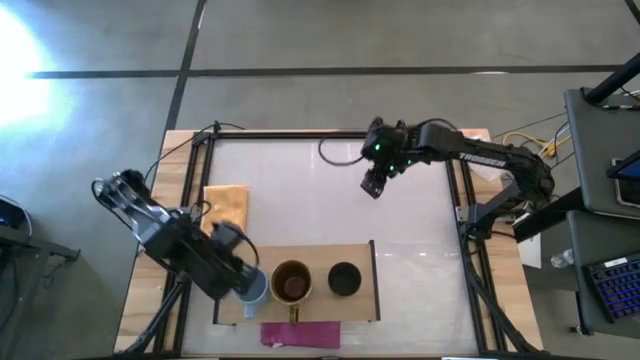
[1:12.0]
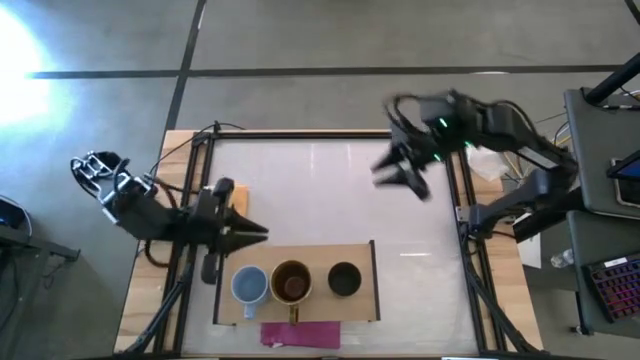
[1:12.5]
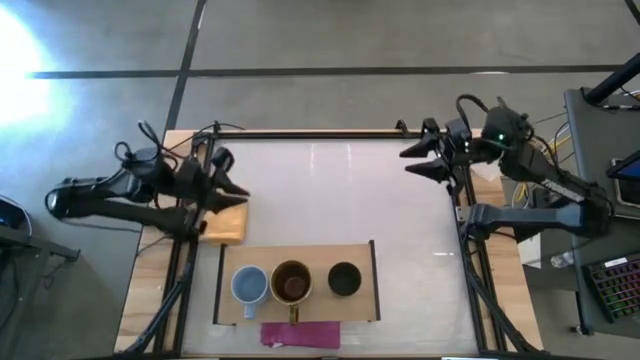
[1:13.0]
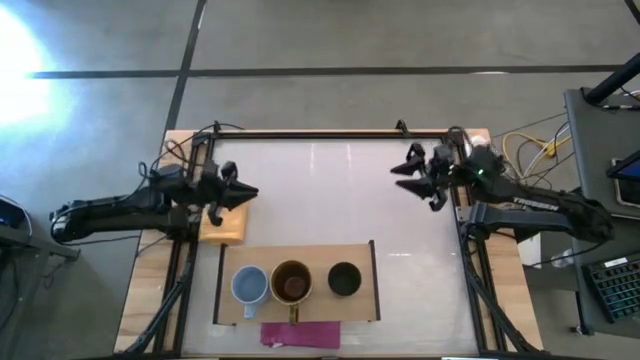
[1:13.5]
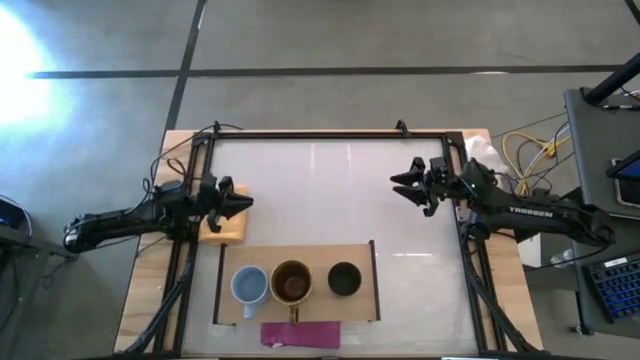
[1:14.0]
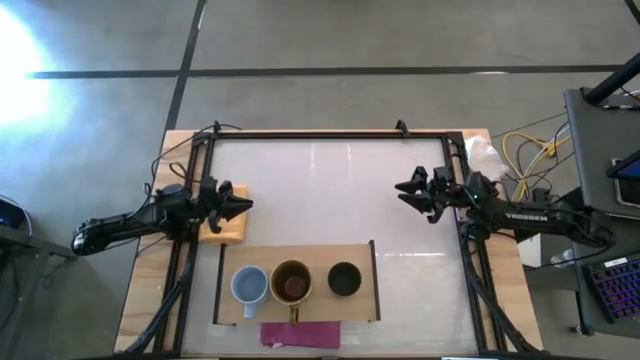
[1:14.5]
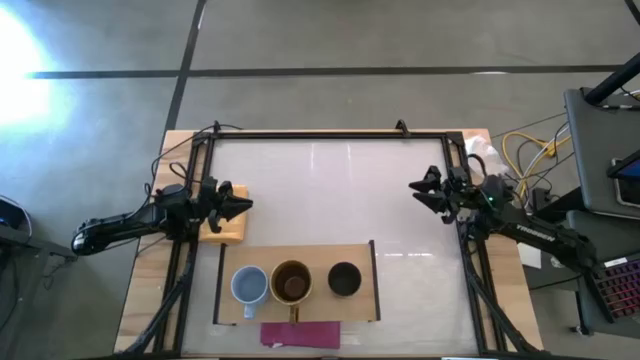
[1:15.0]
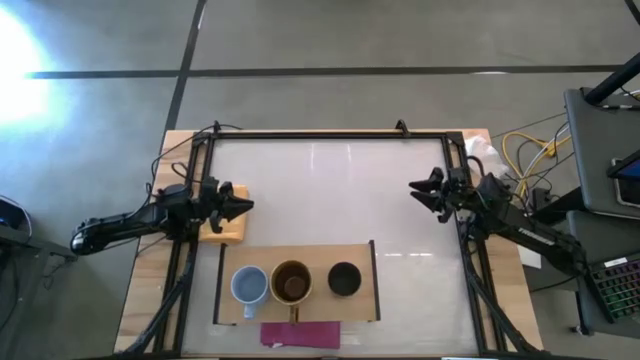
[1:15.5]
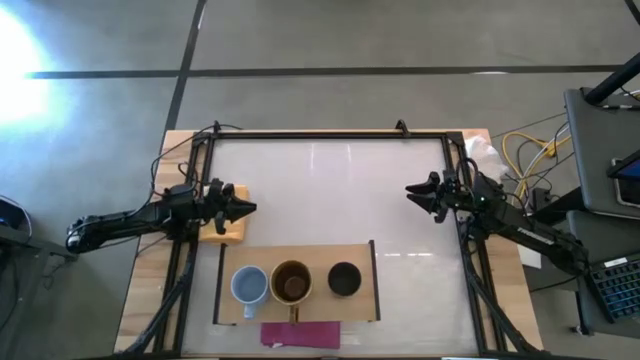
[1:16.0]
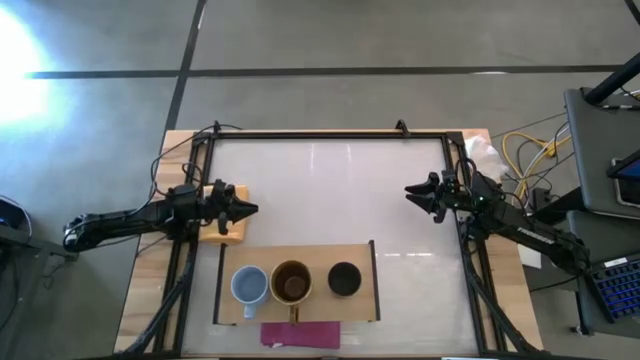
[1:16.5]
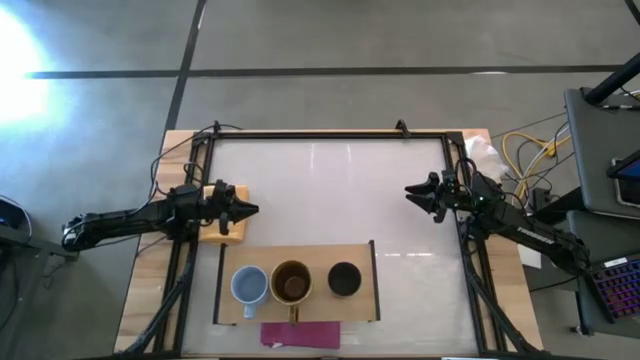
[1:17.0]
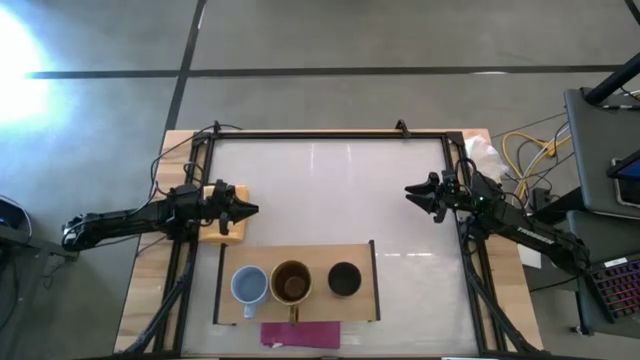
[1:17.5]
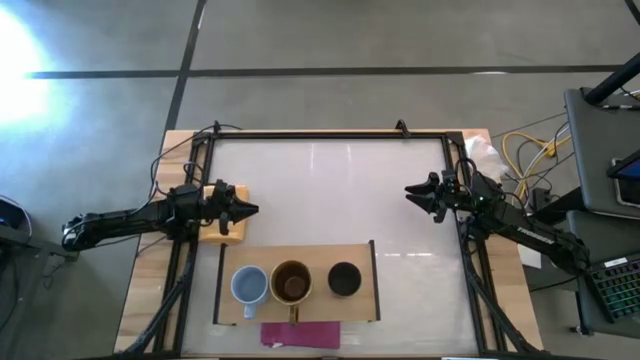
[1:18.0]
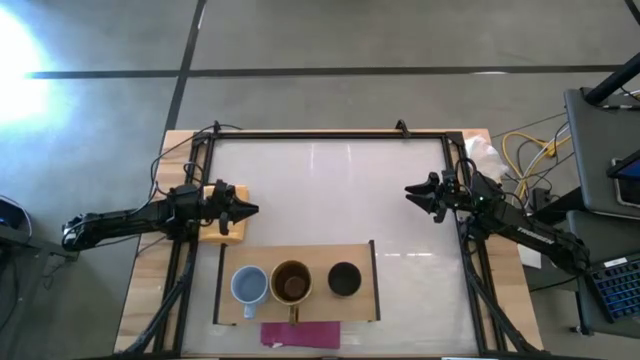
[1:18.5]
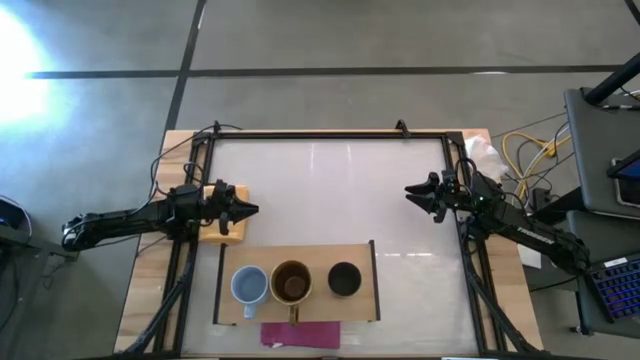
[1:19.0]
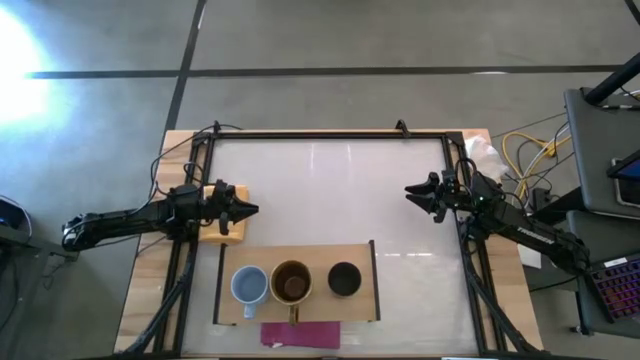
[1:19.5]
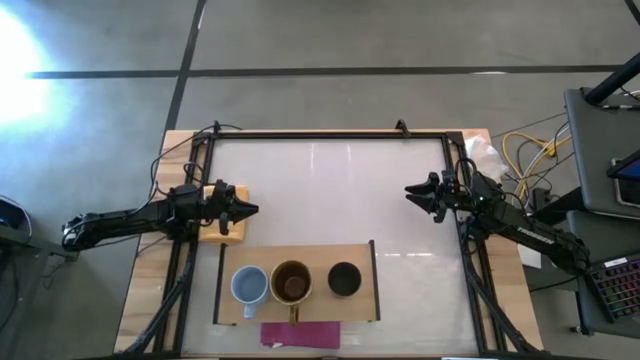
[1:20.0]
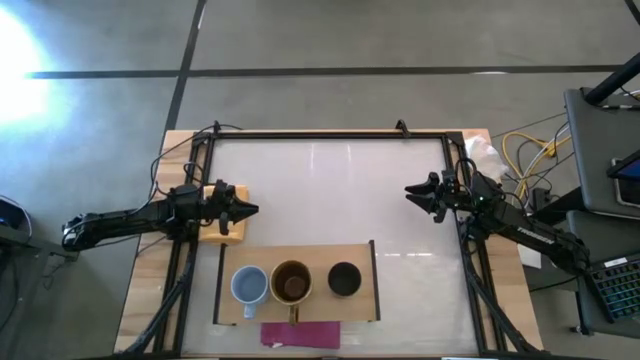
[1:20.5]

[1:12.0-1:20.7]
Task: Stack small to large cups/mugs on shelf
Return to Home Position

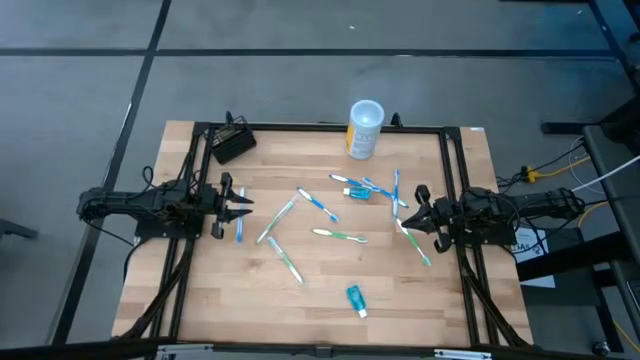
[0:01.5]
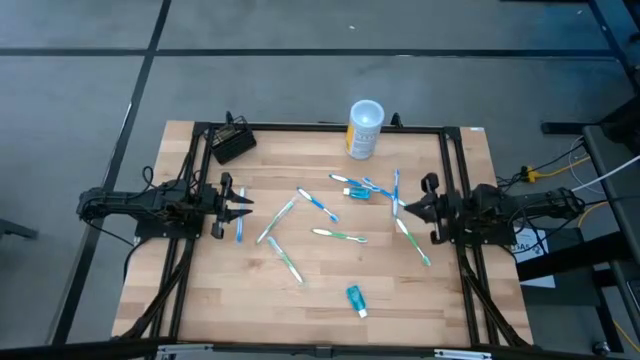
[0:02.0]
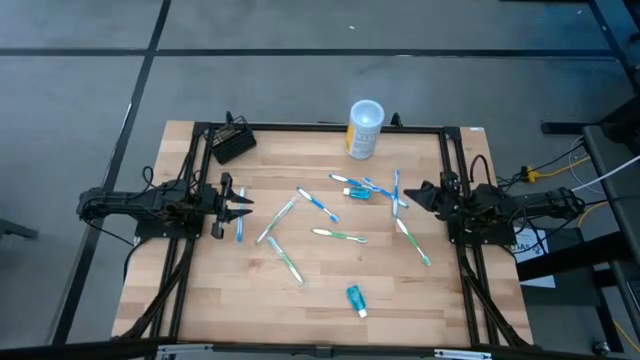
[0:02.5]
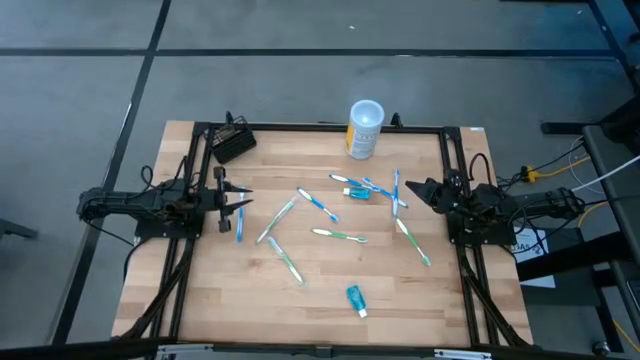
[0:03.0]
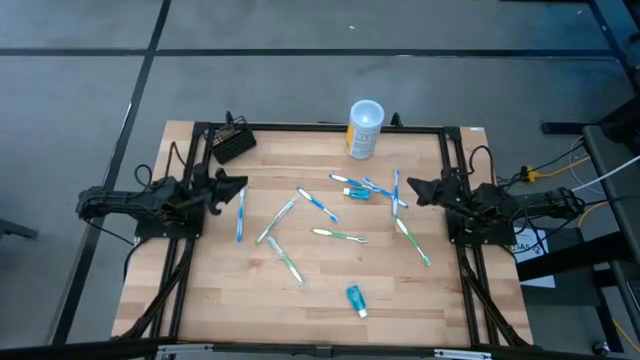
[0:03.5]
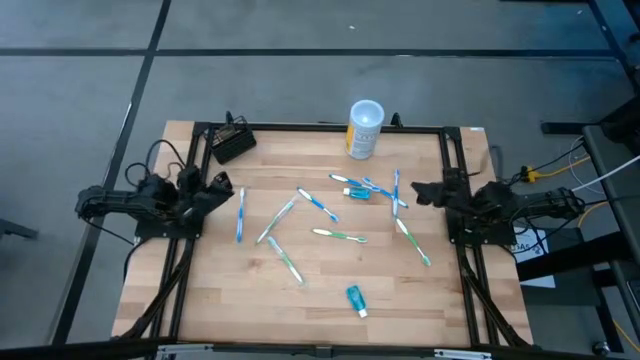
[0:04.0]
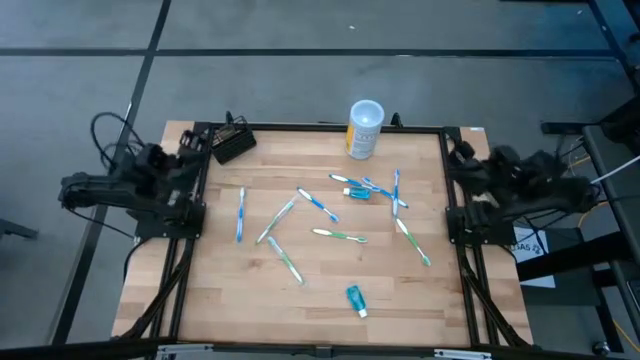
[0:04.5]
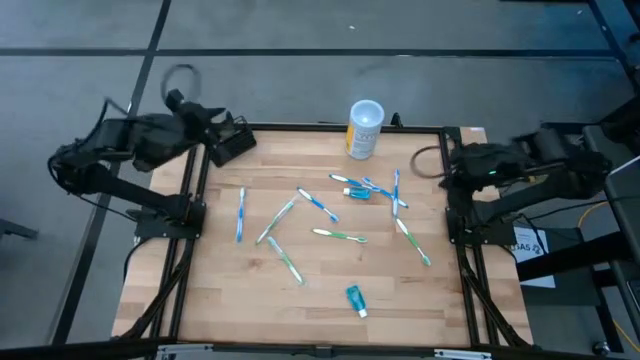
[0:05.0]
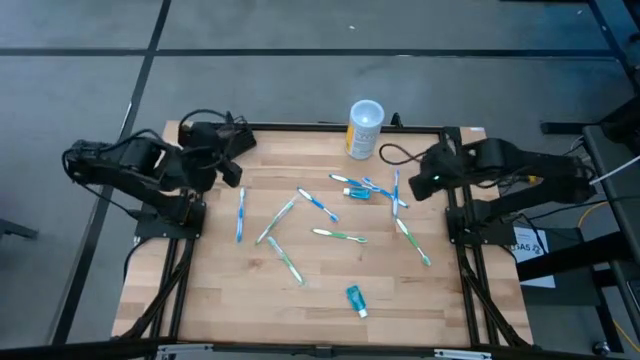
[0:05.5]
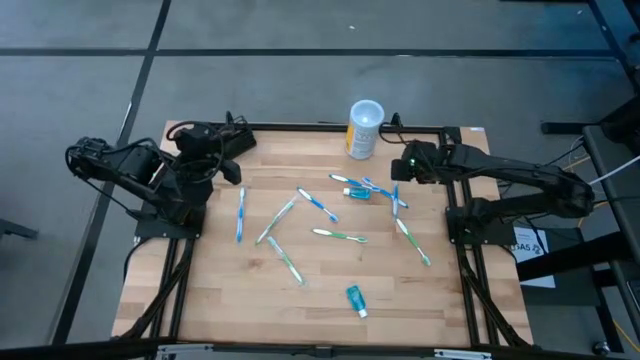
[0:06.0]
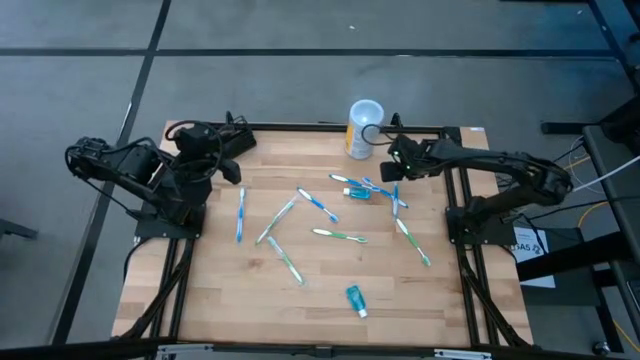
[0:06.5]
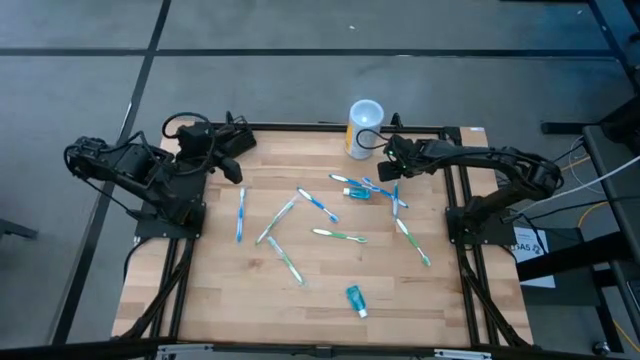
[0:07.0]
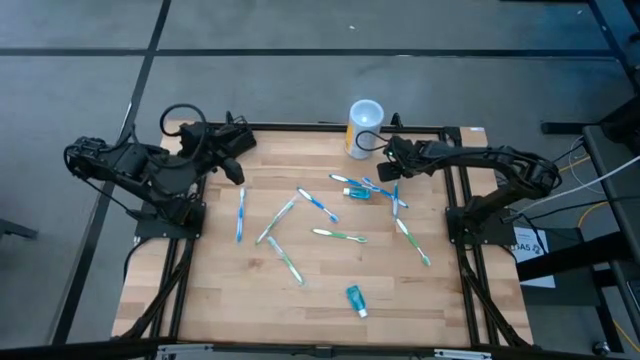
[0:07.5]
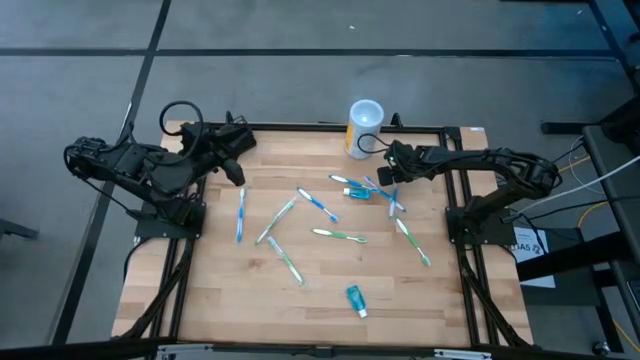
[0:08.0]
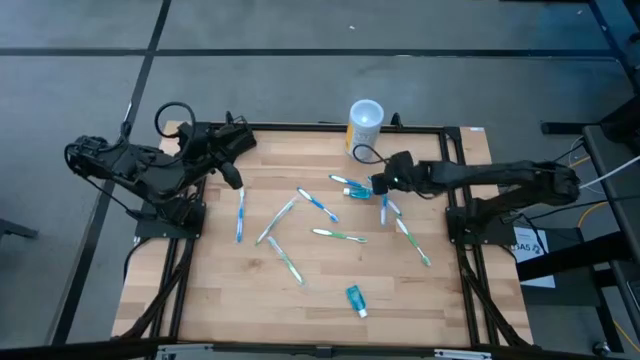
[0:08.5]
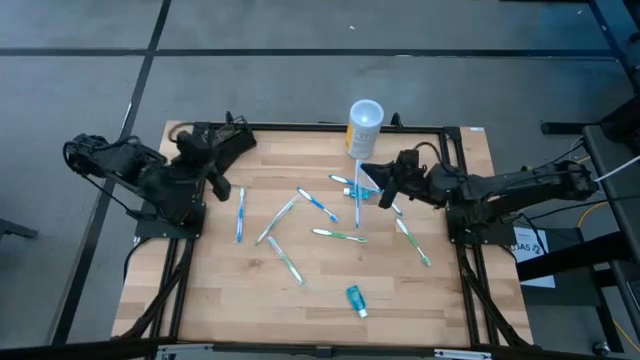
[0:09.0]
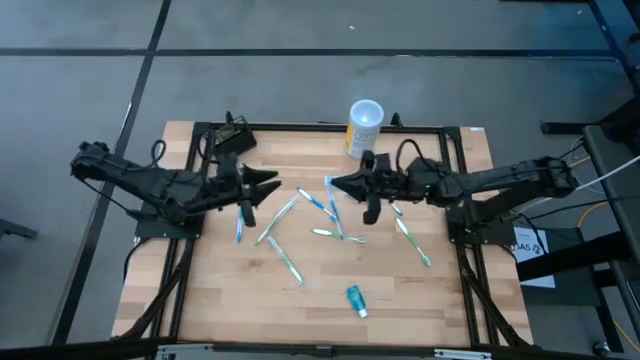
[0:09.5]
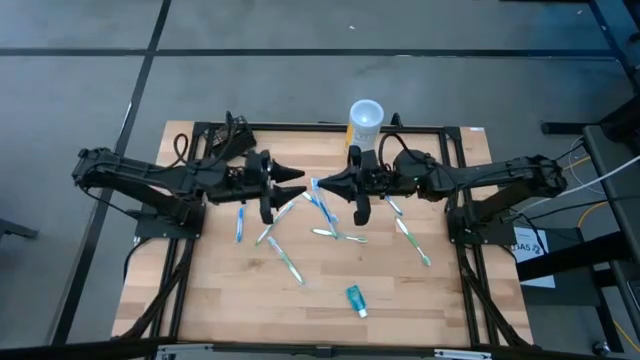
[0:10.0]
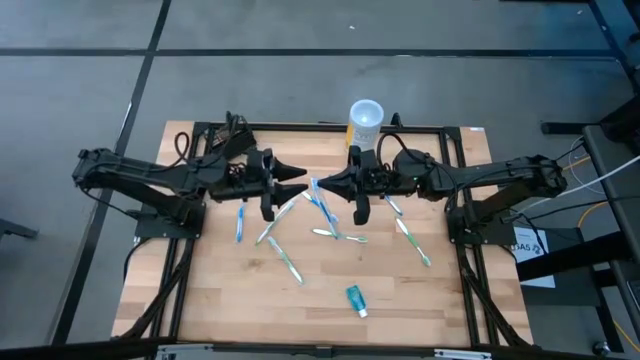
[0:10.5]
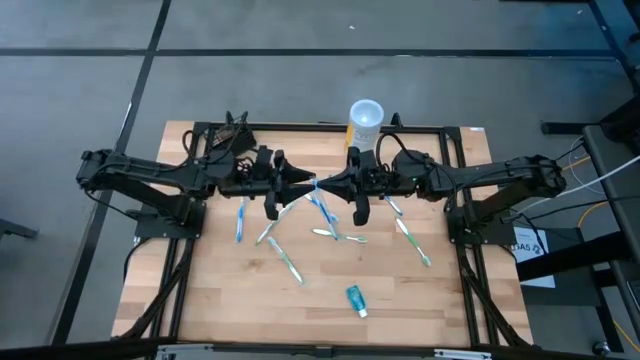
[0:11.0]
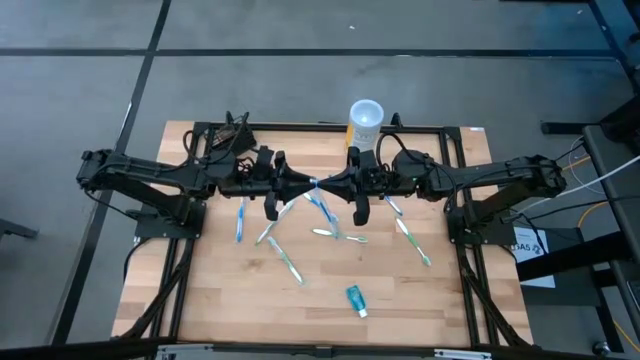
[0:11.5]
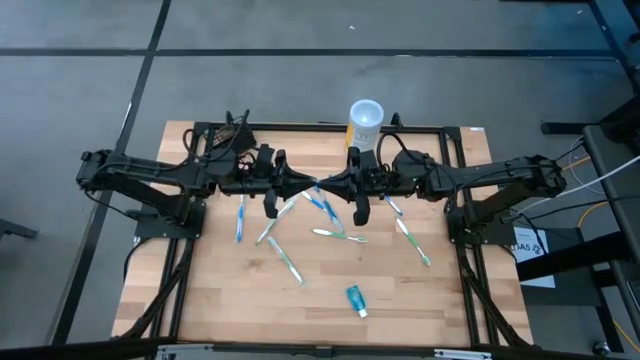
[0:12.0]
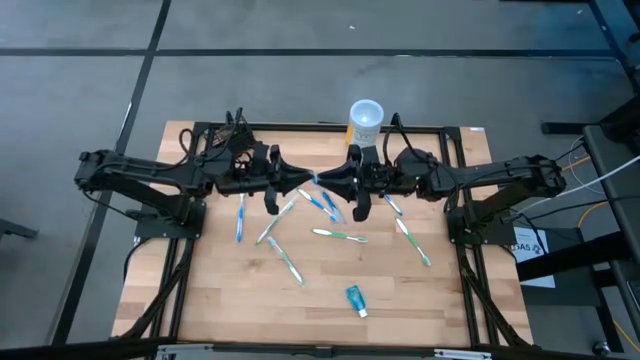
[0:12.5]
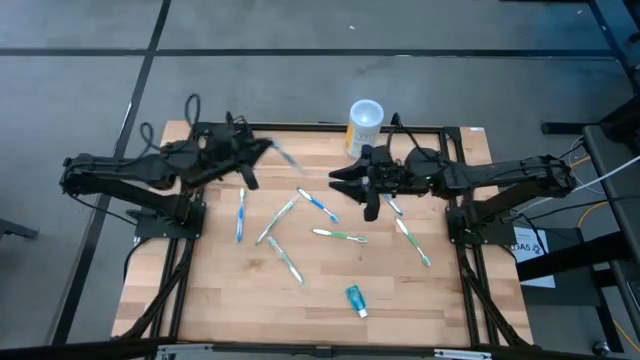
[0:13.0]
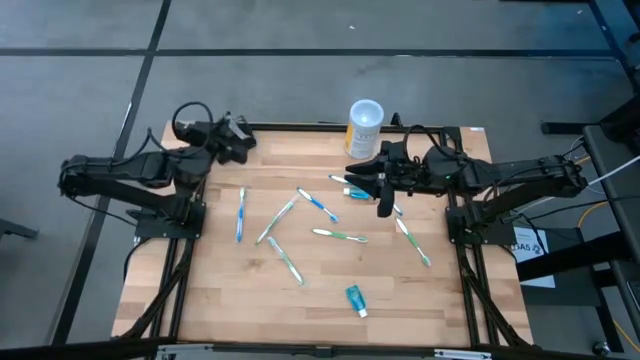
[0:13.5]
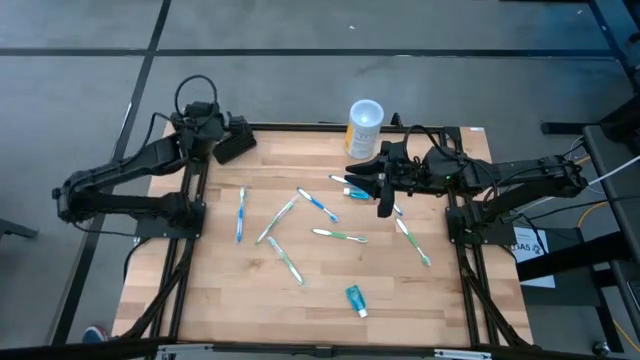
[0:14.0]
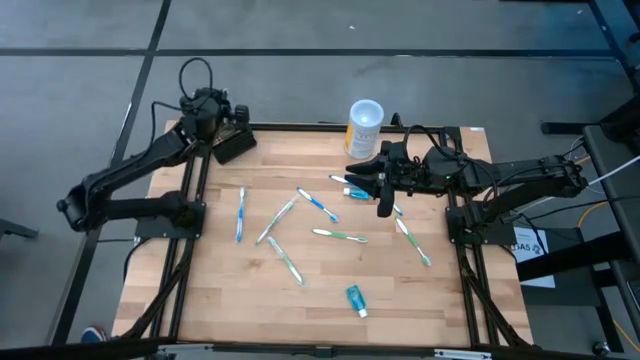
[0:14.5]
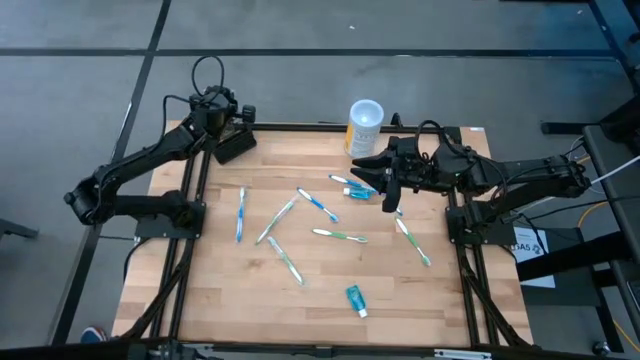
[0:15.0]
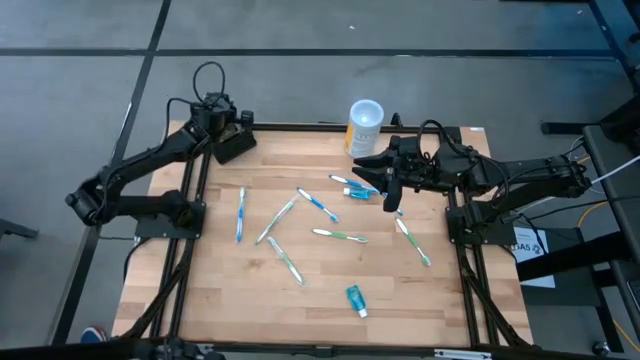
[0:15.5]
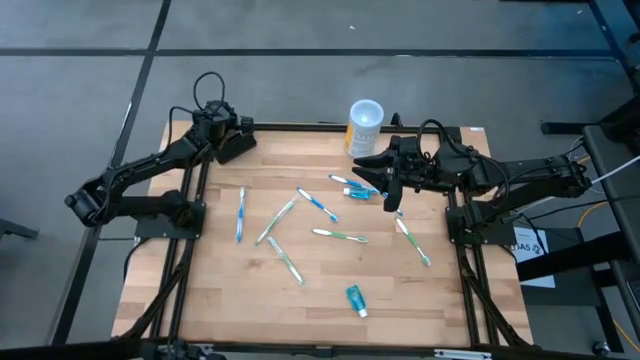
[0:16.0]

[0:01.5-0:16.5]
Task: Pick & Place toothbrushing station
Put the blue toothbrush into the right section of the black organizer
